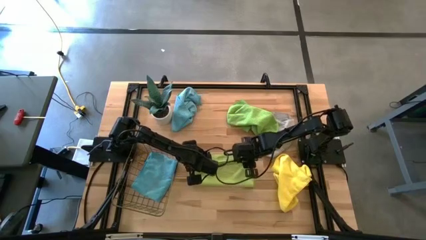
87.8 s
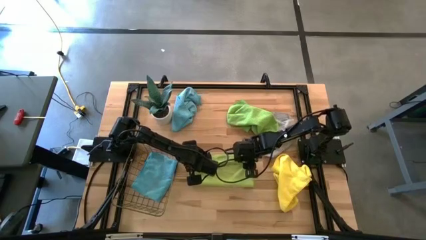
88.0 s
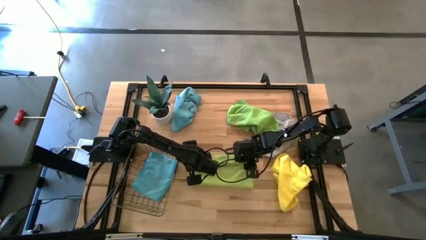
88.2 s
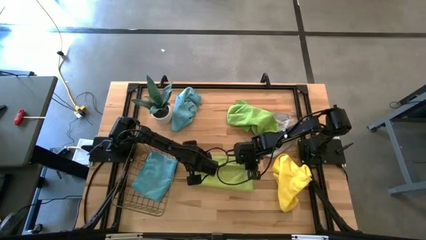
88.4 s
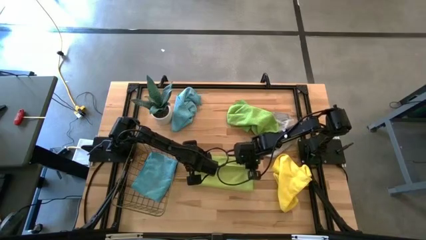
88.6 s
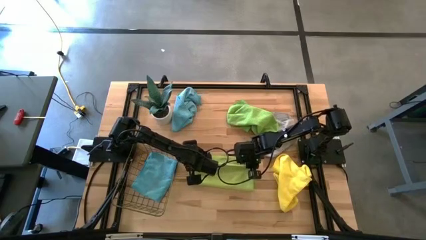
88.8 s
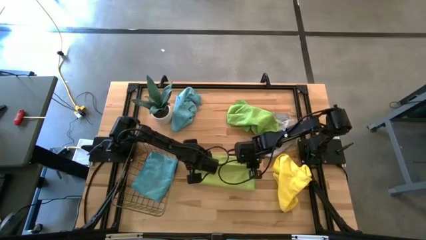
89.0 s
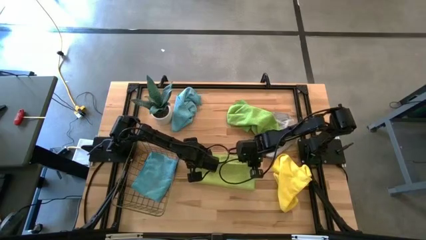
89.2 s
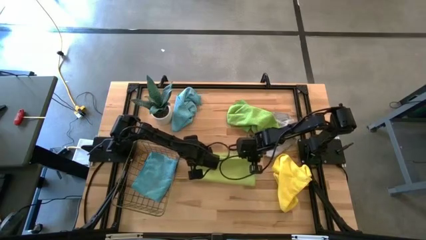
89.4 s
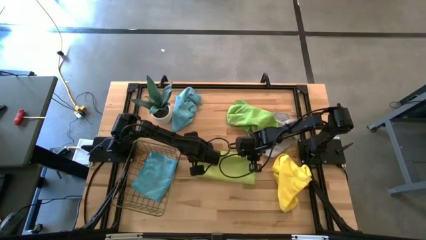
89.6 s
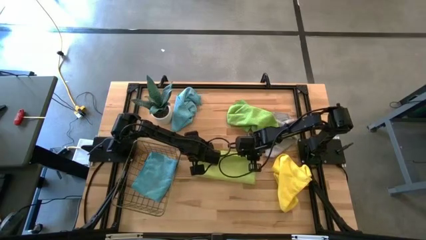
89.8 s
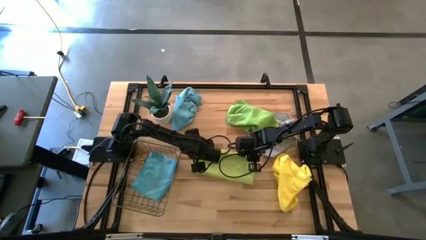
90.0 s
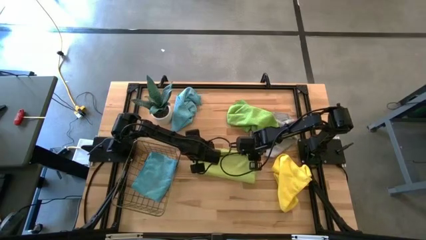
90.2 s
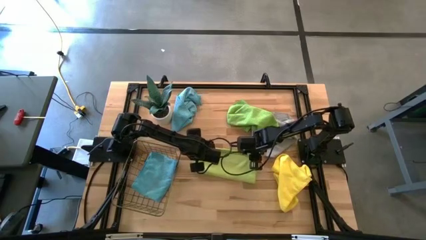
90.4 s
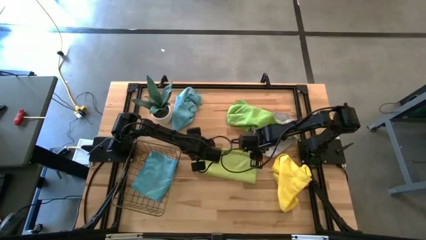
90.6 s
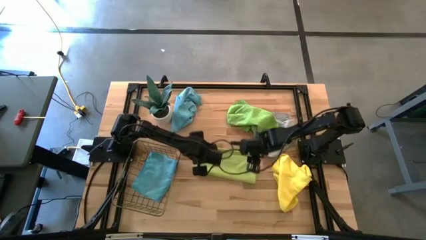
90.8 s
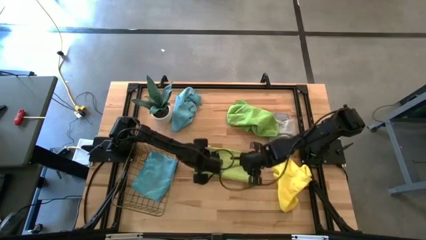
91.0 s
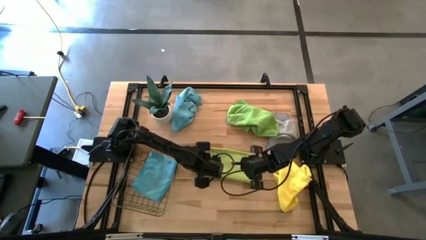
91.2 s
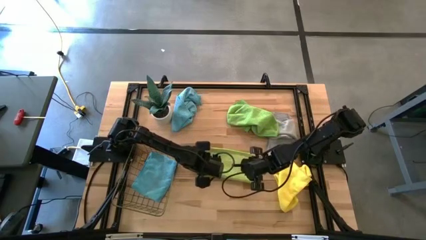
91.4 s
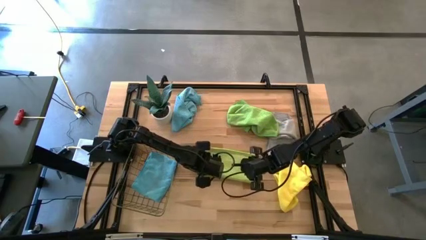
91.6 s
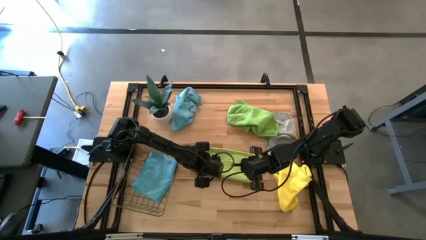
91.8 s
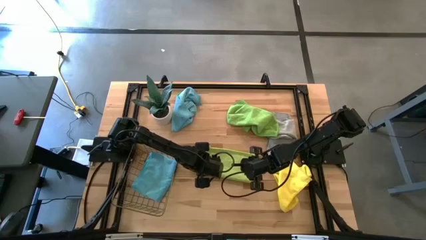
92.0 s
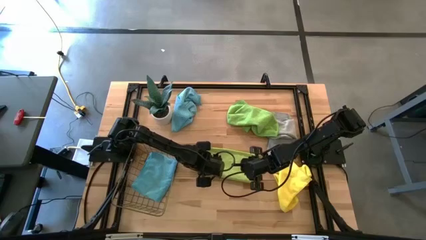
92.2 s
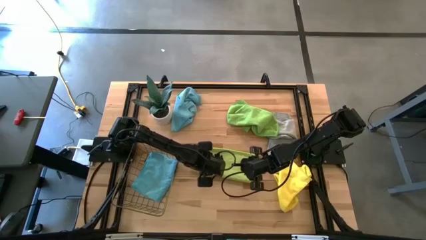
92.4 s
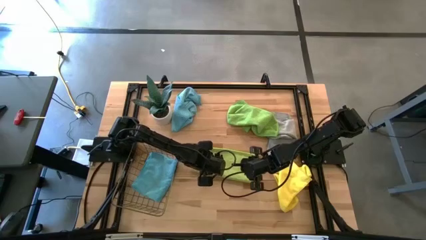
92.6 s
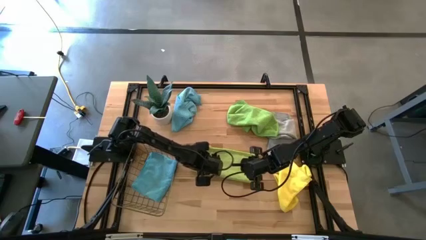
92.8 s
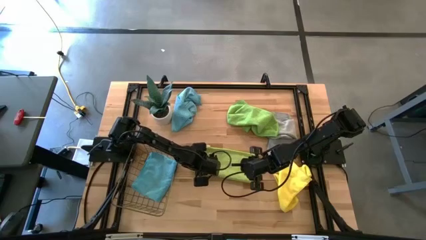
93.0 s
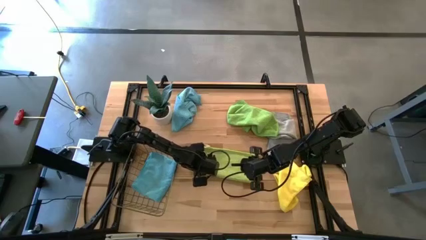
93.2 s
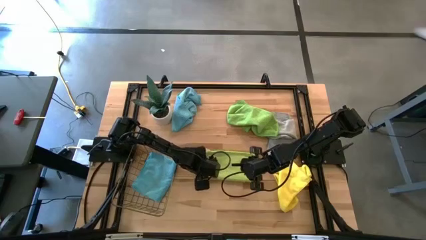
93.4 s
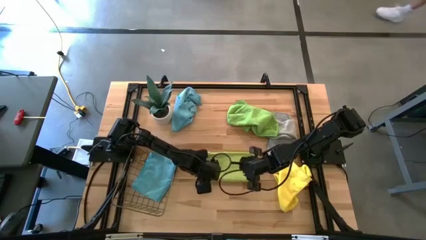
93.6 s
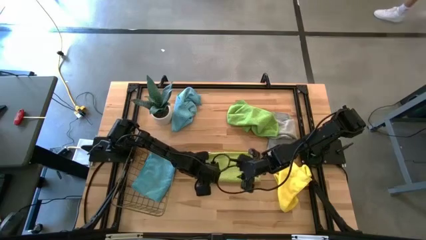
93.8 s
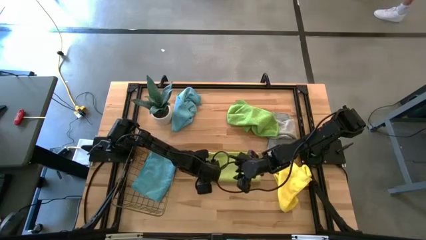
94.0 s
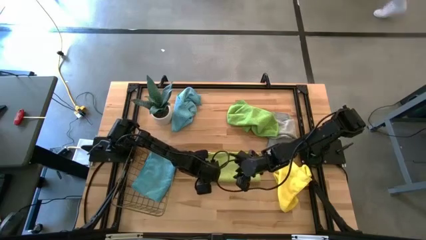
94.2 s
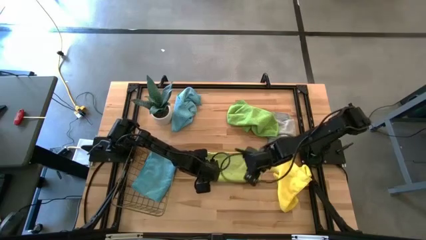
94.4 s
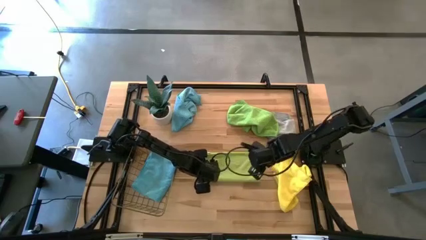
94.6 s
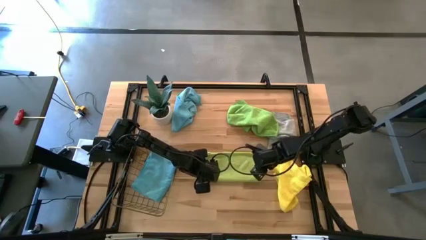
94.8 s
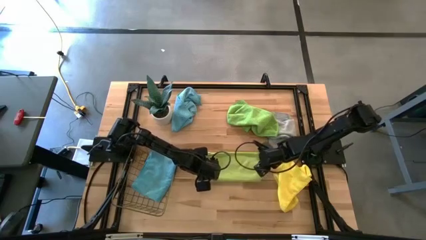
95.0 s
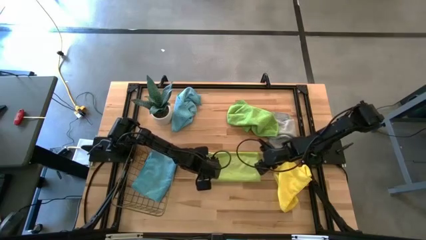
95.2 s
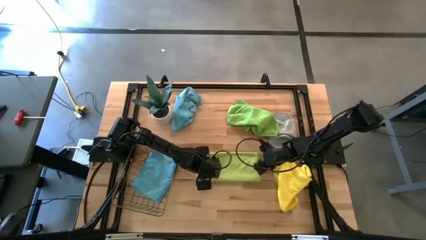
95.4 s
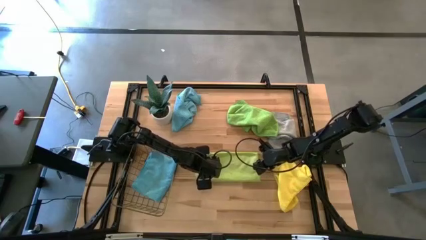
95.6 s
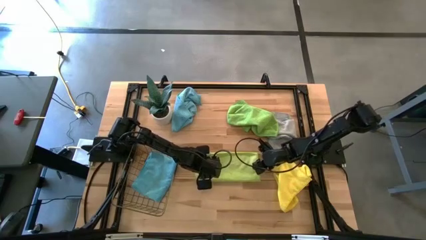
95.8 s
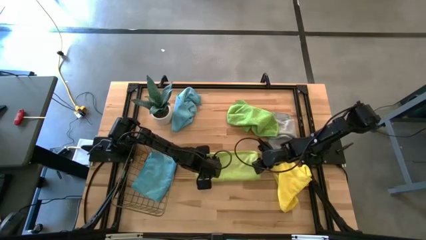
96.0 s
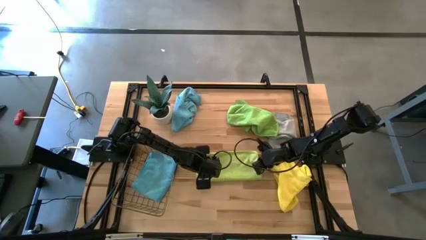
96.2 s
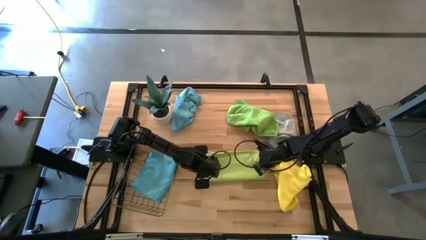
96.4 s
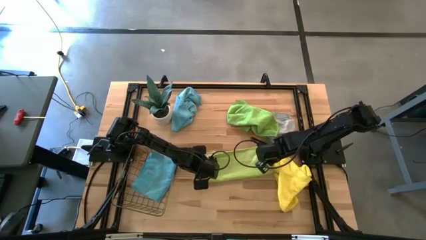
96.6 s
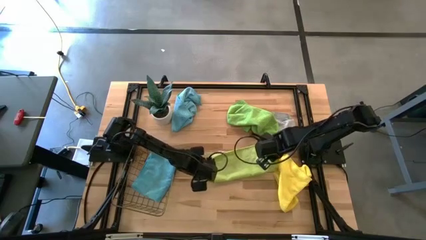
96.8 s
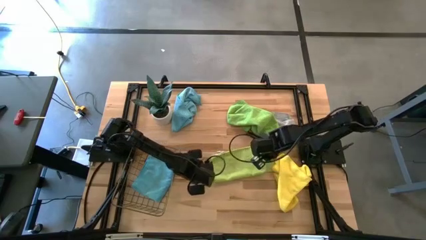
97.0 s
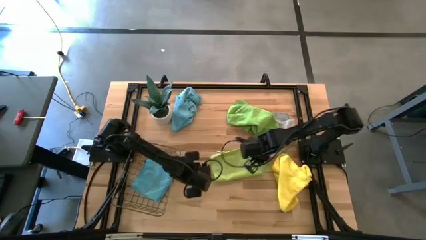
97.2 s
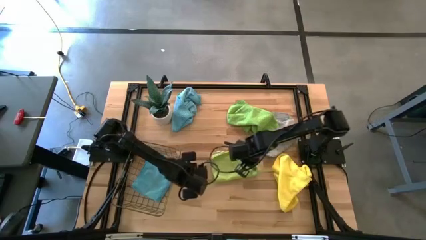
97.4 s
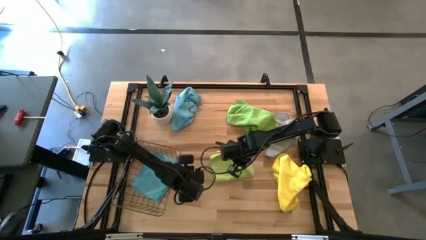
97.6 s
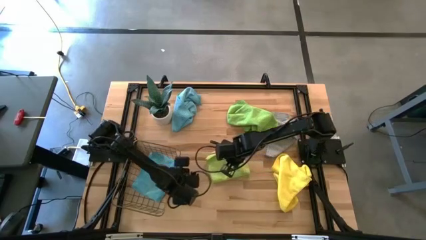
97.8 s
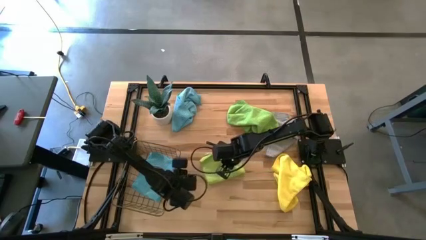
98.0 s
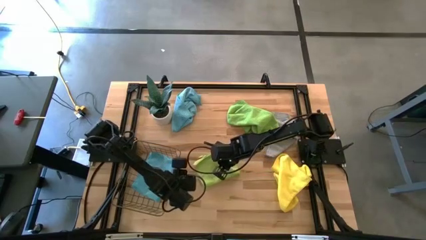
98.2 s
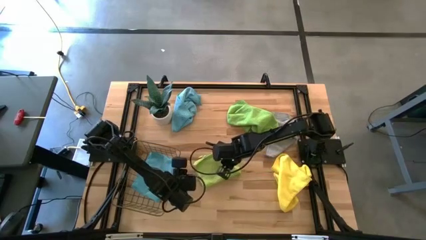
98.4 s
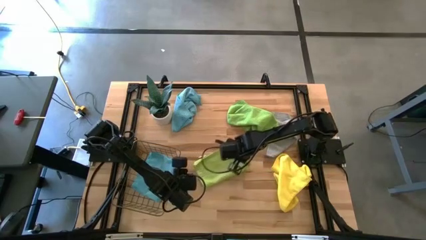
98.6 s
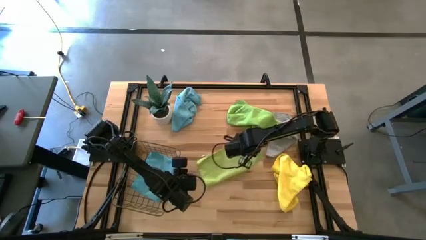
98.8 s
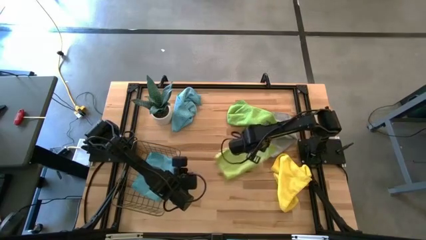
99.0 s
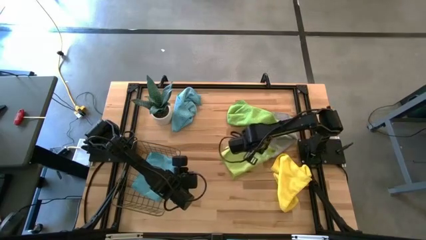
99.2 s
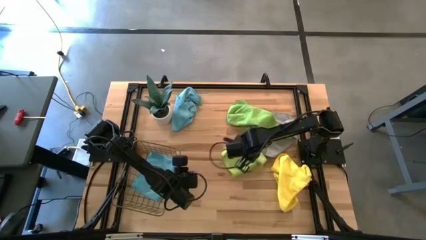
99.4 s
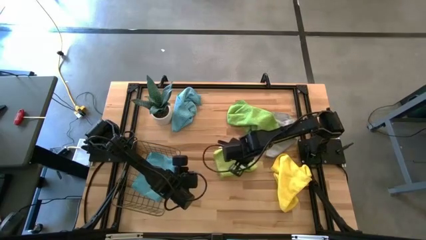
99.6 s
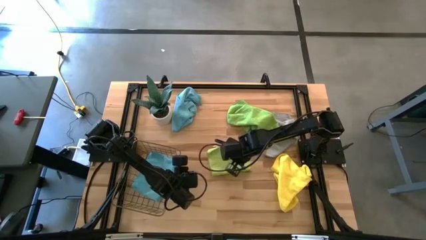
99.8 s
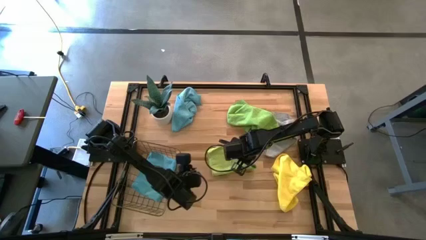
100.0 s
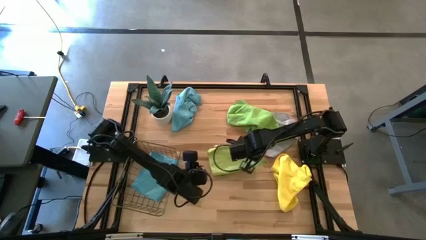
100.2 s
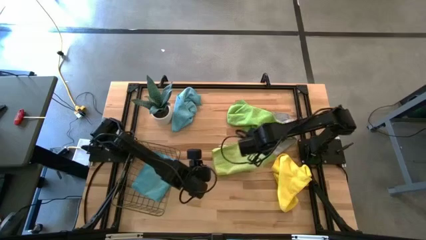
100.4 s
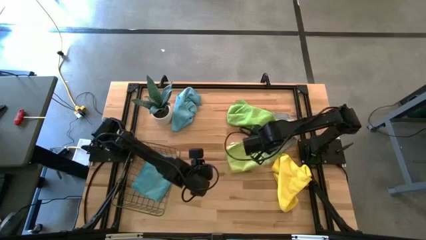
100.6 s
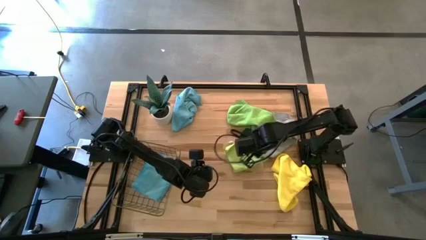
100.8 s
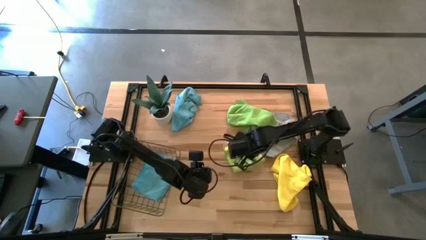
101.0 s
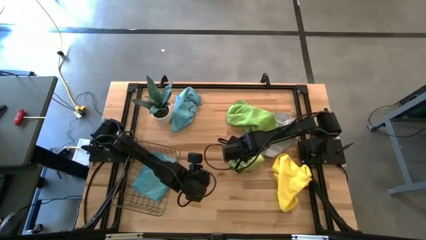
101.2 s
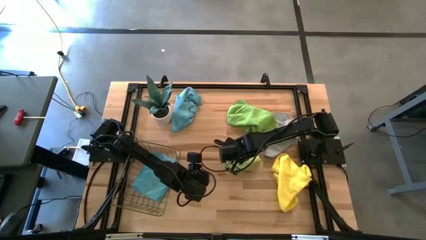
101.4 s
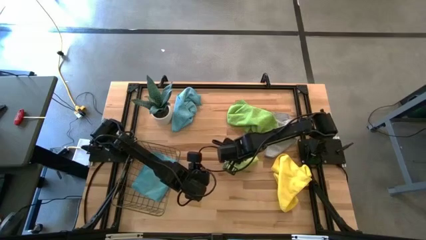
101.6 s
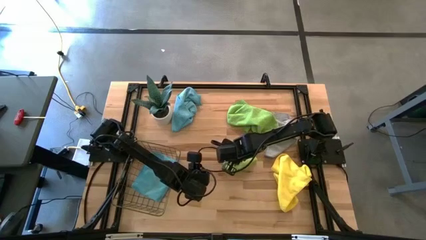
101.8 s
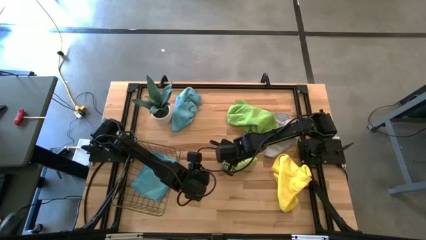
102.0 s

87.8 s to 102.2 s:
Task: Fold microfiber towels
Fold the light green microfiber towel
